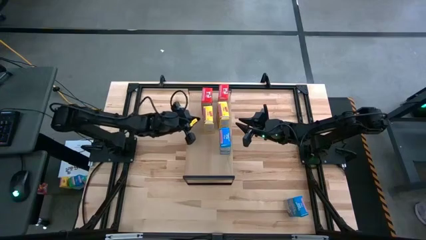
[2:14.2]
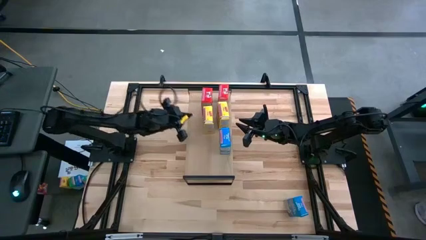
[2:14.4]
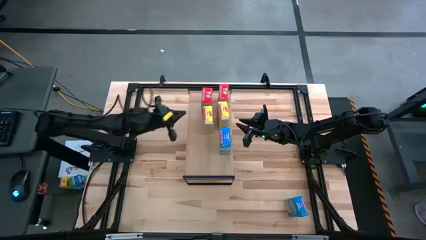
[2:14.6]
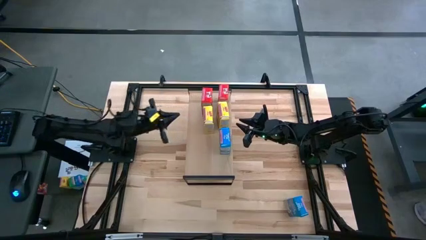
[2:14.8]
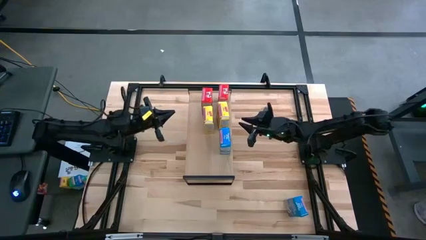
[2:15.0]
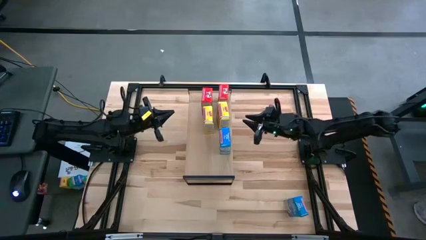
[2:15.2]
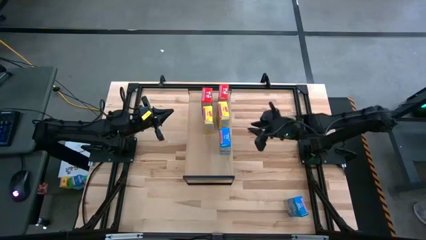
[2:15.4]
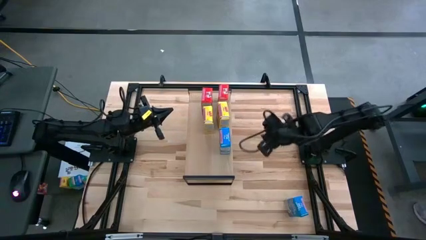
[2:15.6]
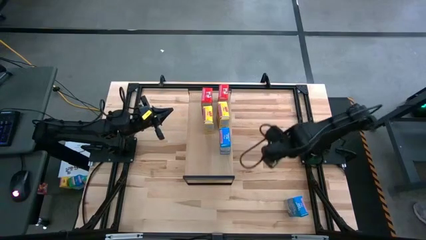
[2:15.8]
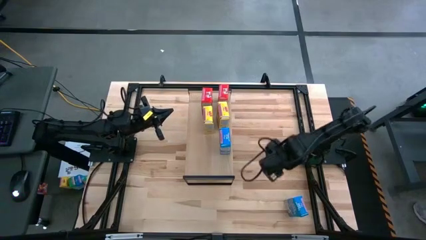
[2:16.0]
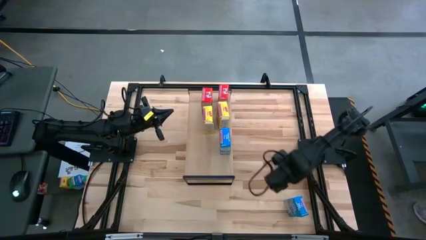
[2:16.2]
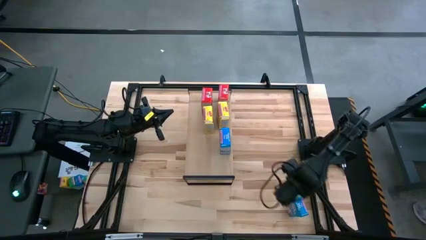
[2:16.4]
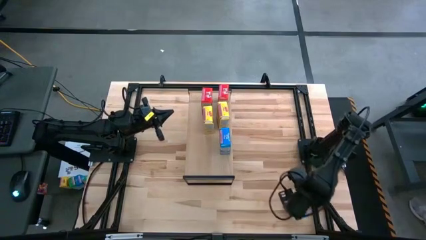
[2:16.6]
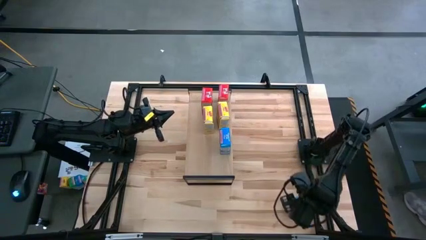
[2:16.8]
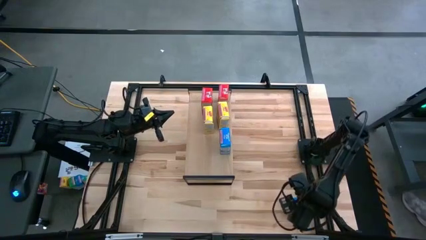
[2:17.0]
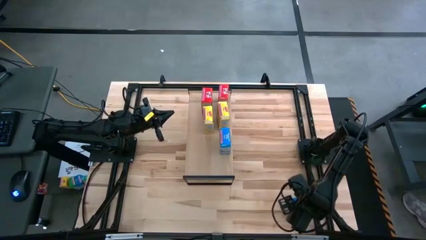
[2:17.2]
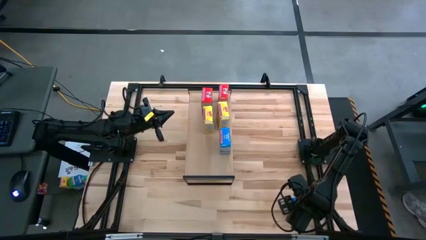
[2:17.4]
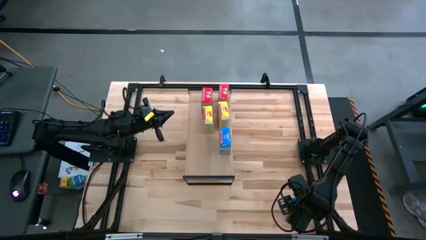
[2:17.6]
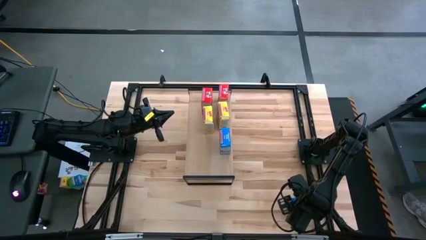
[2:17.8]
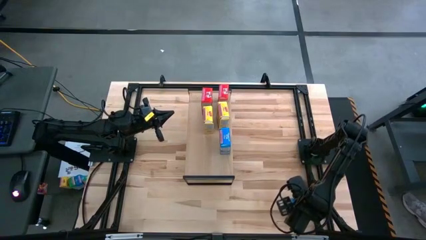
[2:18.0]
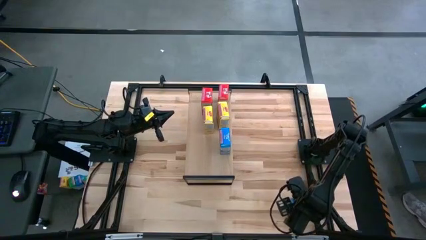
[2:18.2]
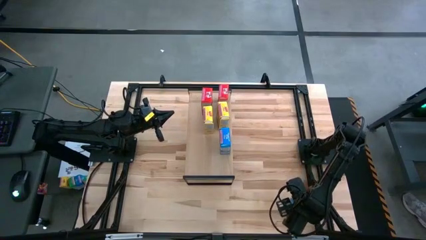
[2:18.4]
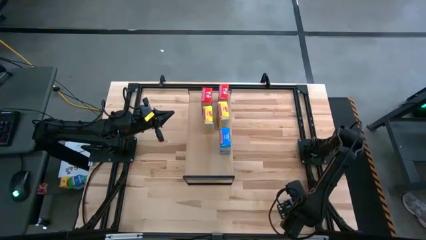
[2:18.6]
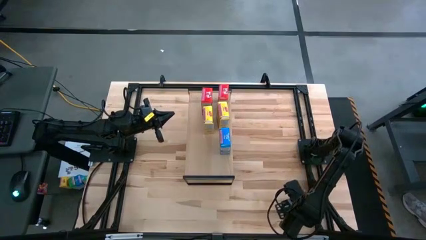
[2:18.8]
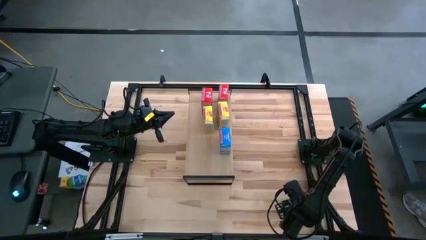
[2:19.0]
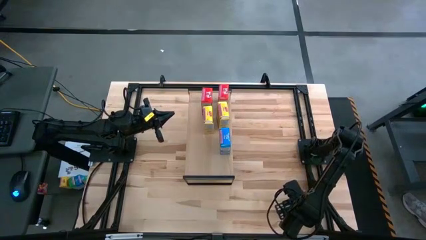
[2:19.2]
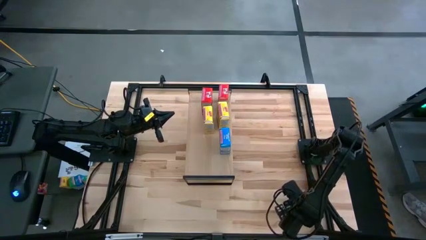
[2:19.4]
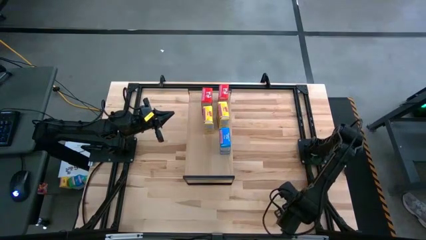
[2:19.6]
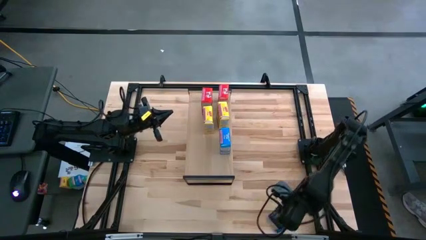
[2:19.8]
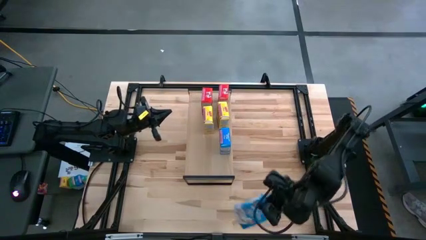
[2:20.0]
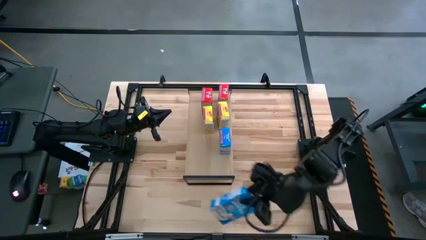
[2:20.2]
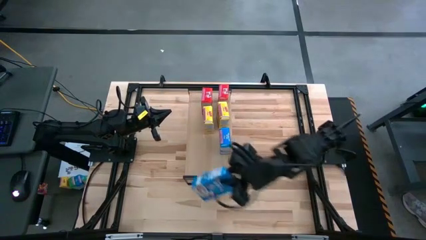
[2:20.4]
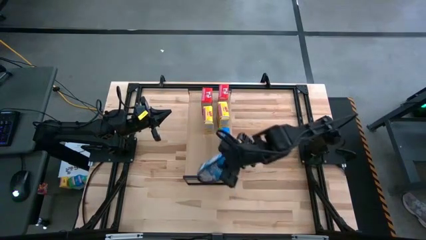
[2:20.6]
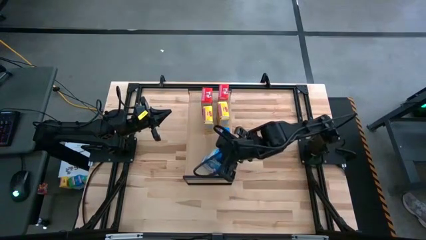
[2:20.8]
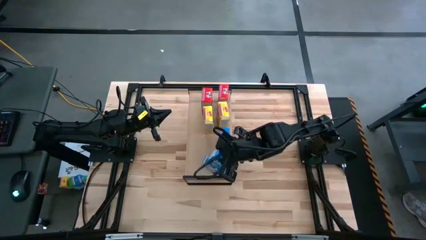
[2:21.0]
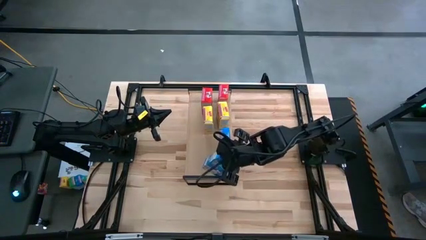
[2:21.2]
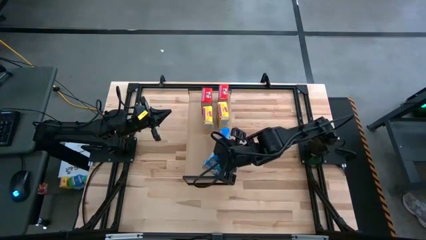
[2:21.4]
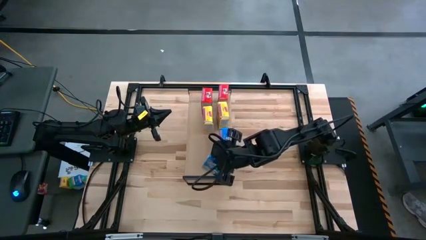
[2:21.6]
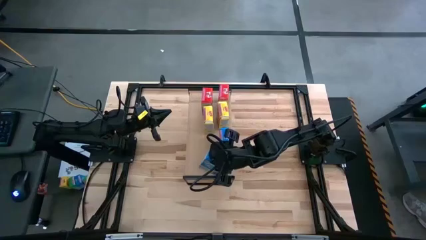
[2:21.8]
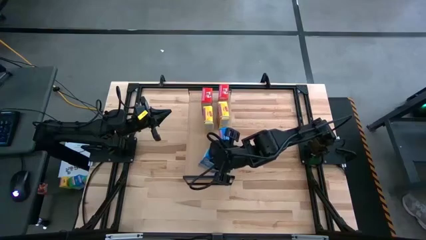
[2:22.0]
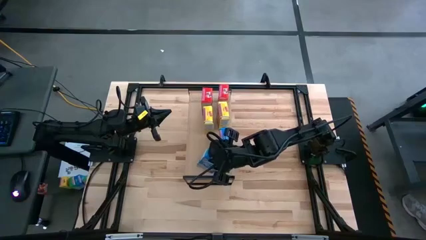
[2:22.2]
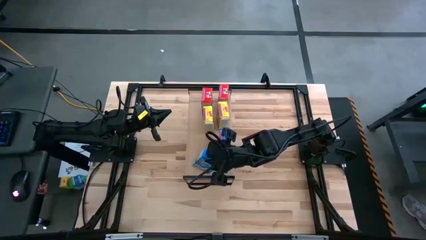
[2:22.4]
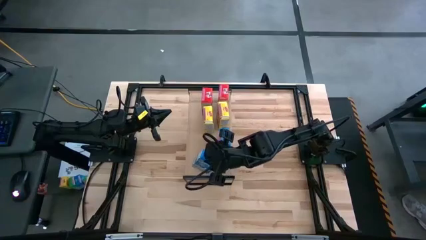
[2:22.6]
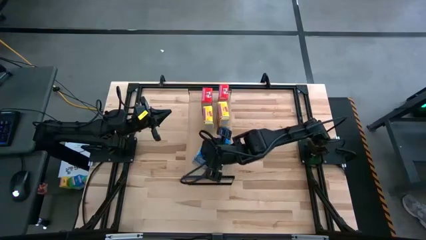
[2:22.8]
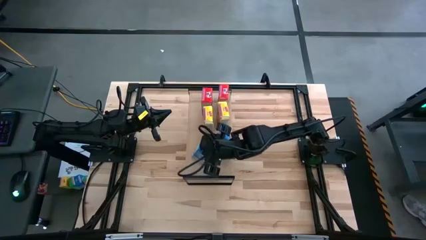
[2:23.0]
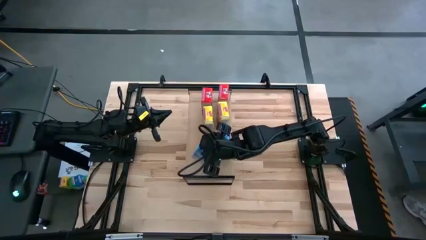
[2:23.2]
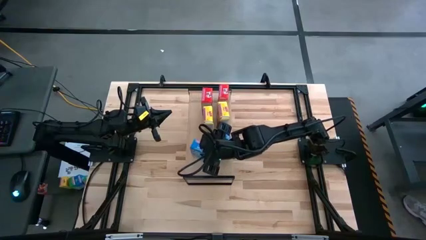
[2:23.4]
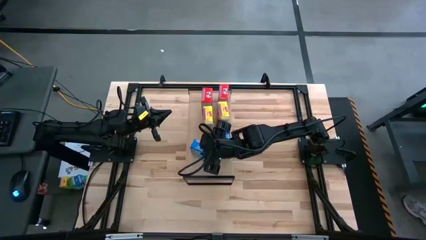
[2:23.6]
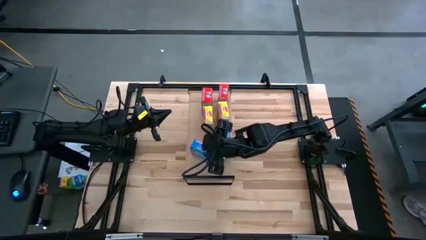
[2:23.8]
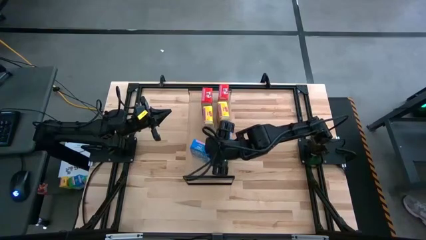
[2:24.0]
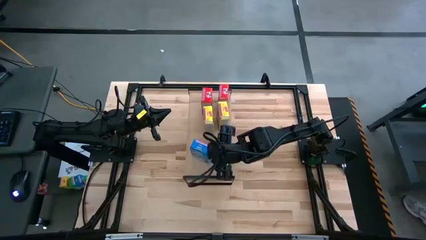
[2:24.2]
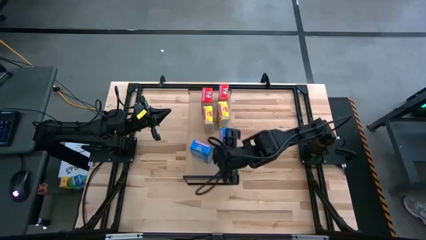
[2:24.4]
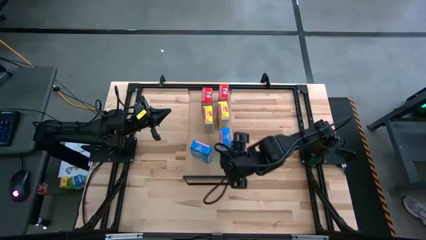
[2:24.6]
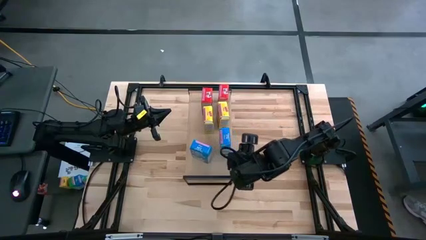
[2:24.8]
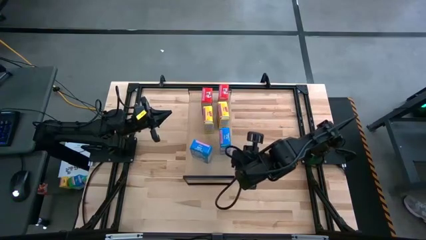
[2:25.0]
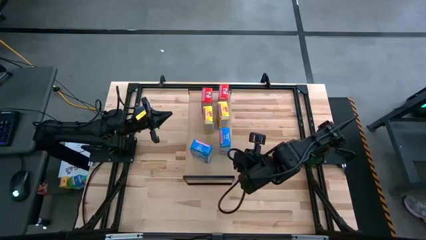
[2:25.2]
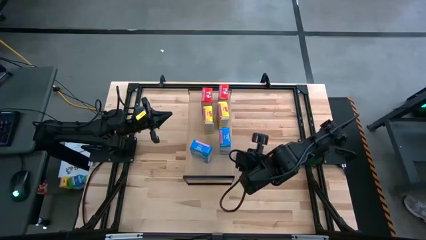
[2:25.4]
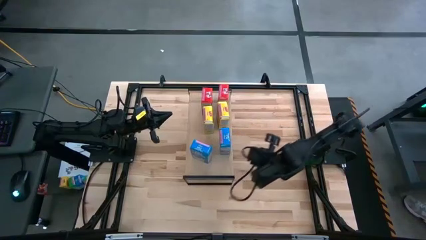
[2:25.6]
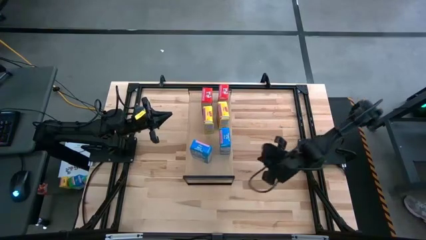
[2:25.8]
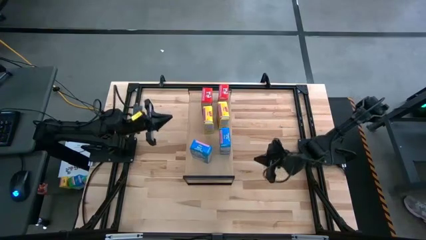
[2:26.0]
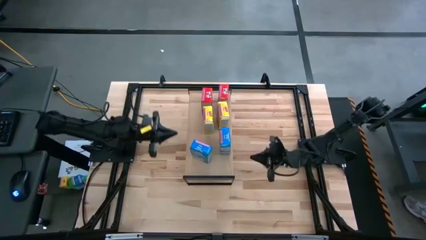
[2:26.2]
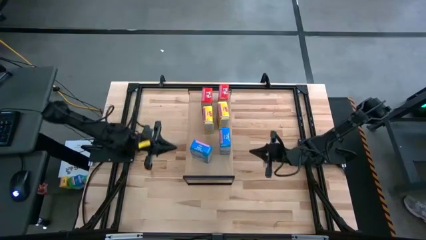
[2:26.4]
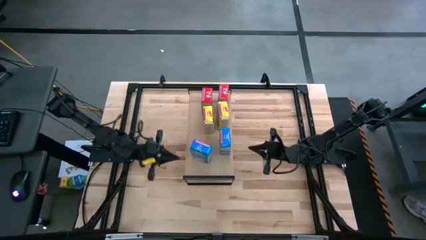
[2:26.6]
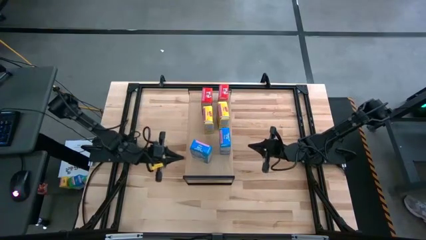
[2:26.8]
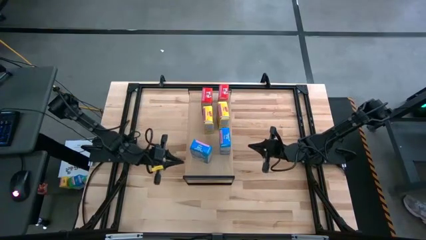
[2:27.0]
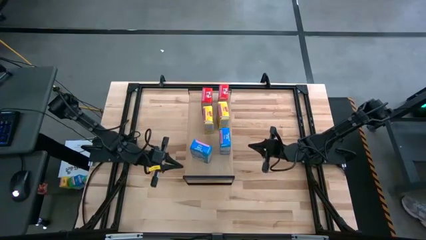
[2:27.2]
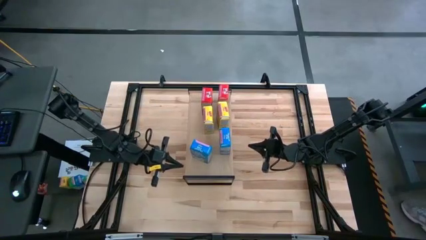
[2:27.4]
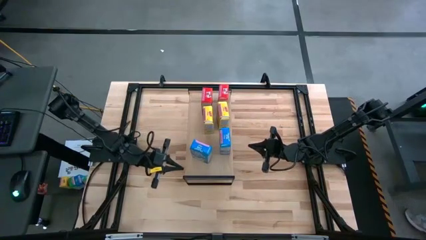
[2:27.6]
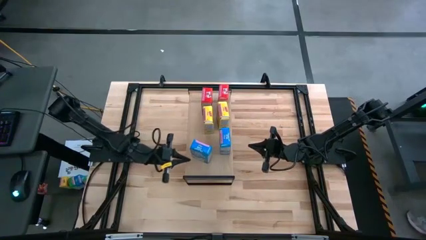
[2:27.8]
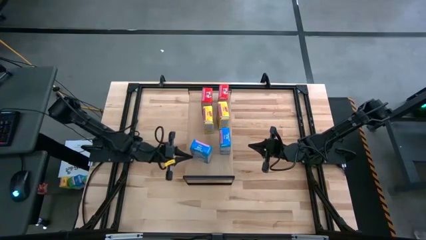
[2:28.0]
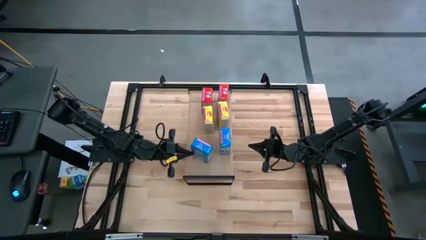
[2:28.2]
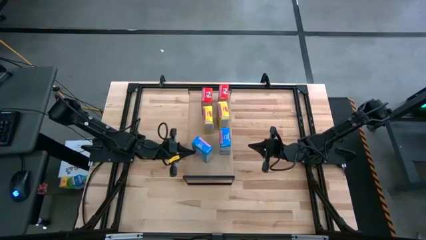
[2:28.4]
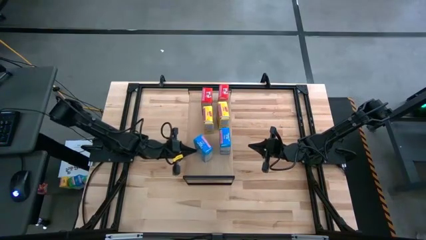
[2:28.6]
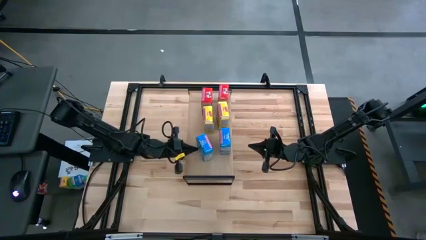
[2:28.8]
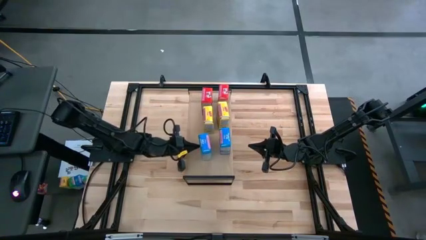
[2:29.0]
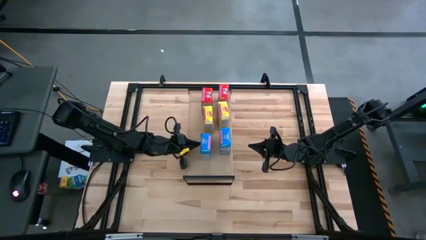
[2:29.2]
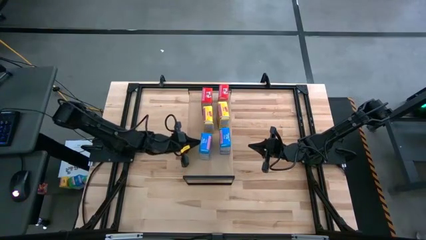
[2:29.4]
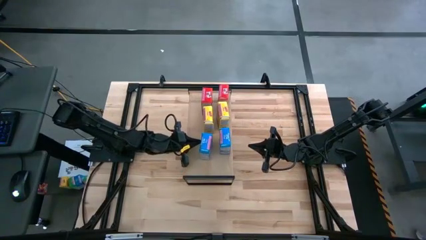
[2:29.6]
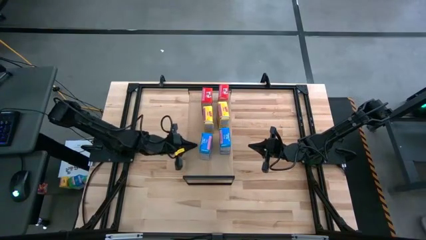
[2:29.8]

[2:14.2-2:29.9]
Task: Stack cereal on shelf
Put the blue cereal box on the shelf aligned with the other blue cereal box
